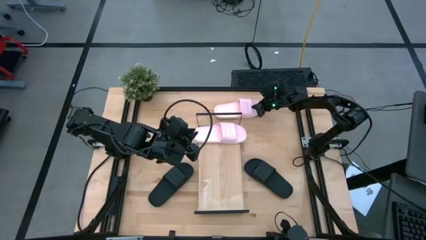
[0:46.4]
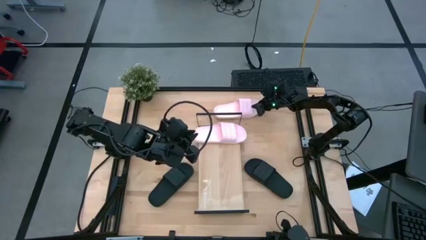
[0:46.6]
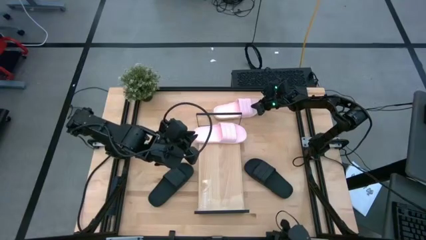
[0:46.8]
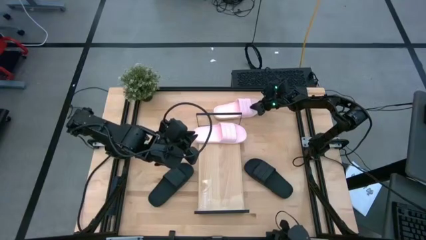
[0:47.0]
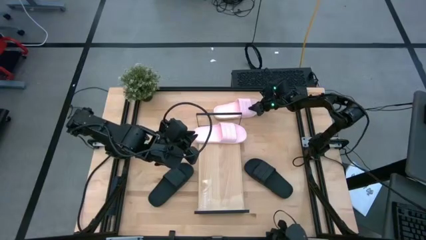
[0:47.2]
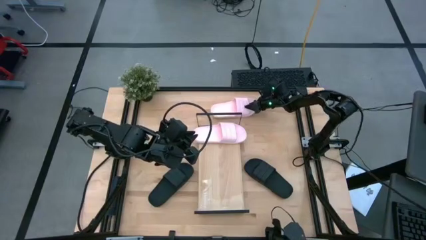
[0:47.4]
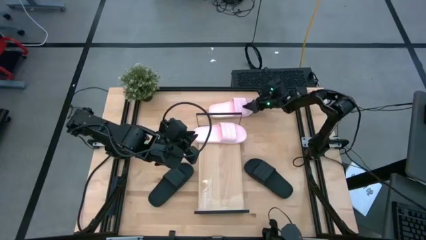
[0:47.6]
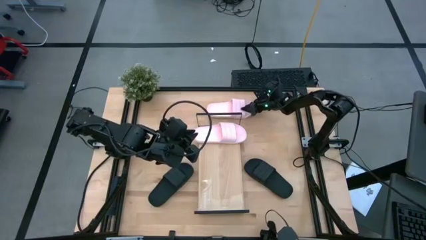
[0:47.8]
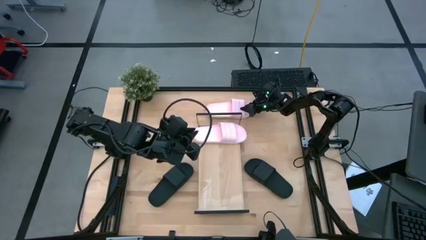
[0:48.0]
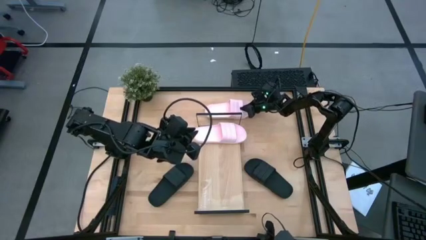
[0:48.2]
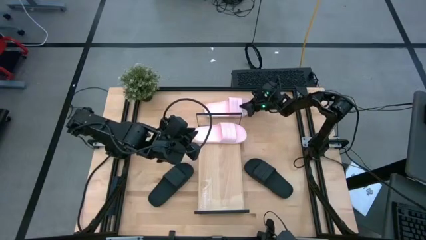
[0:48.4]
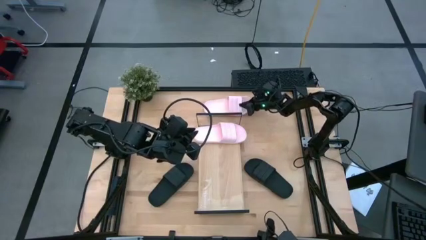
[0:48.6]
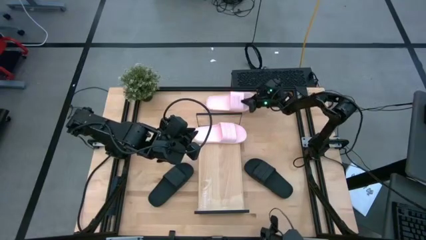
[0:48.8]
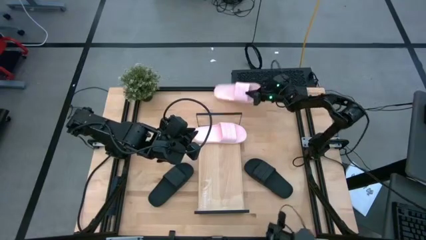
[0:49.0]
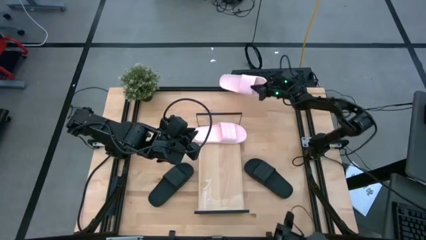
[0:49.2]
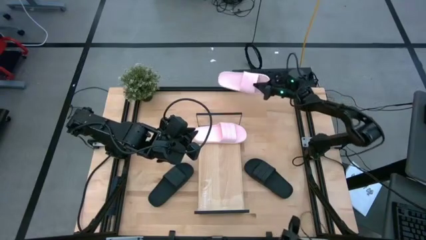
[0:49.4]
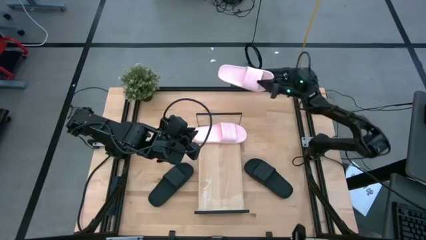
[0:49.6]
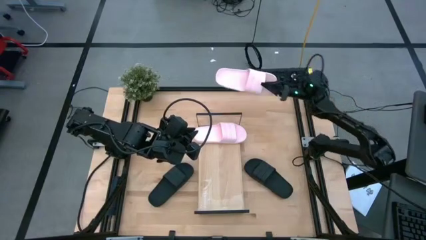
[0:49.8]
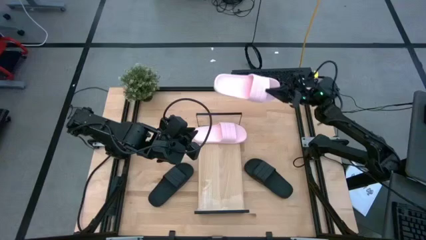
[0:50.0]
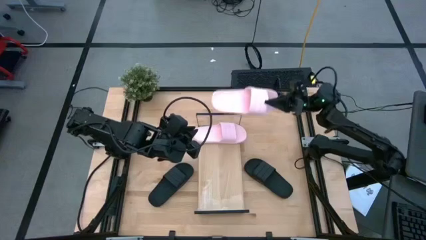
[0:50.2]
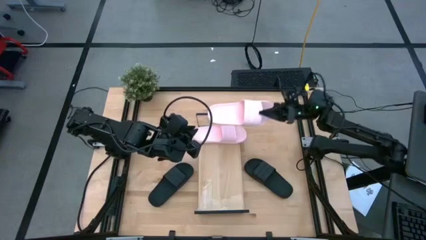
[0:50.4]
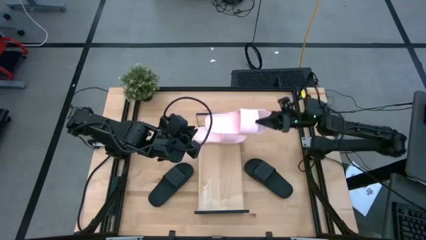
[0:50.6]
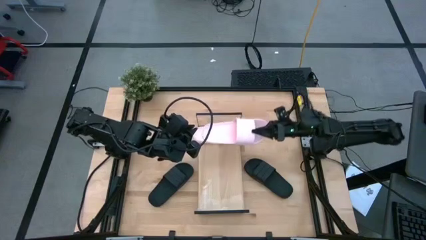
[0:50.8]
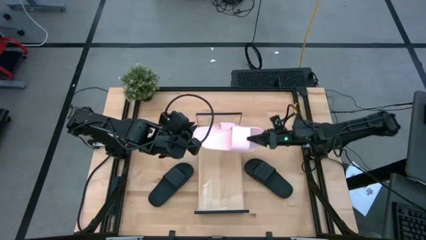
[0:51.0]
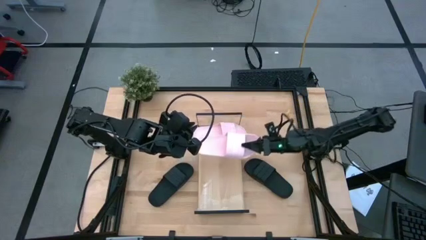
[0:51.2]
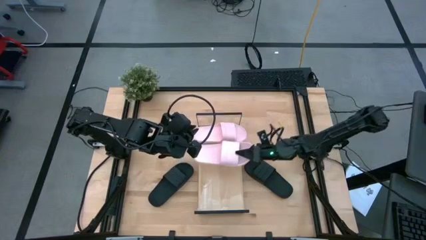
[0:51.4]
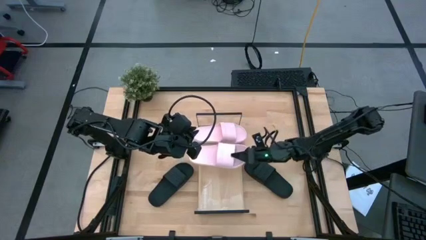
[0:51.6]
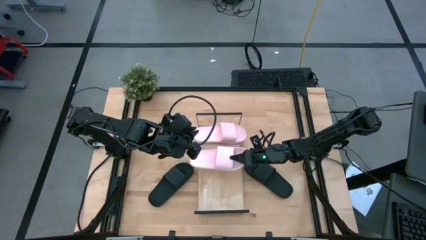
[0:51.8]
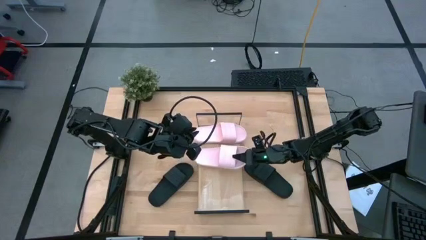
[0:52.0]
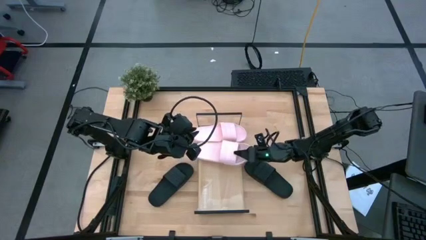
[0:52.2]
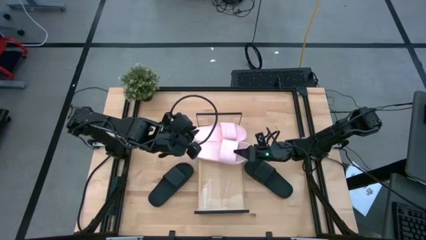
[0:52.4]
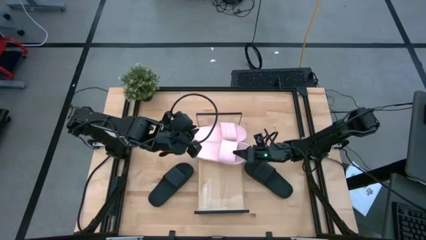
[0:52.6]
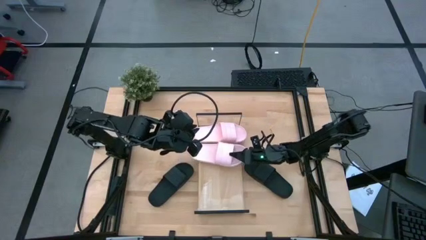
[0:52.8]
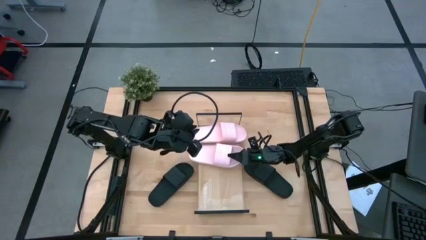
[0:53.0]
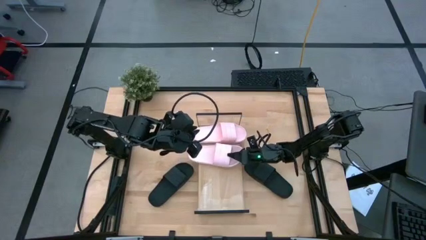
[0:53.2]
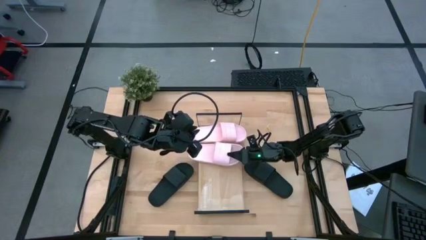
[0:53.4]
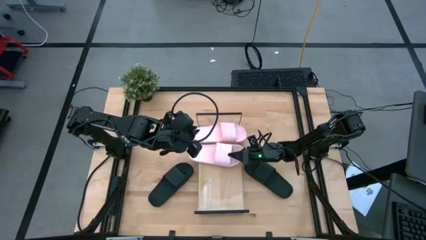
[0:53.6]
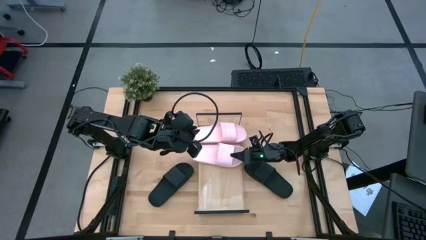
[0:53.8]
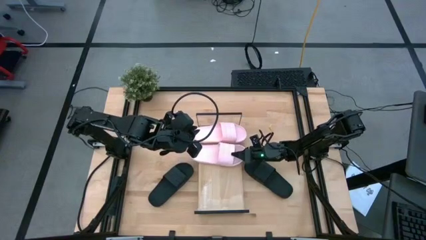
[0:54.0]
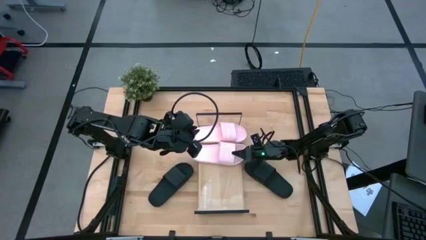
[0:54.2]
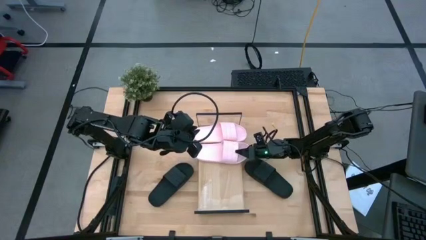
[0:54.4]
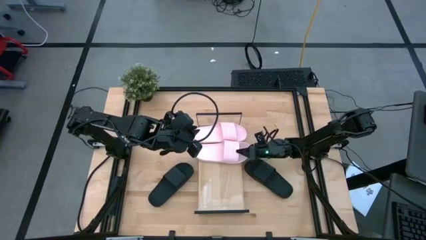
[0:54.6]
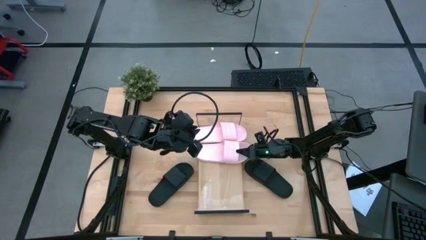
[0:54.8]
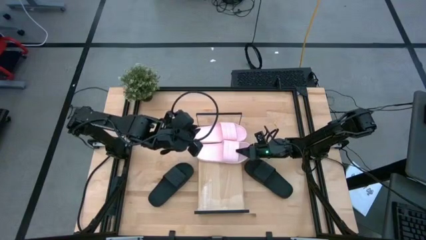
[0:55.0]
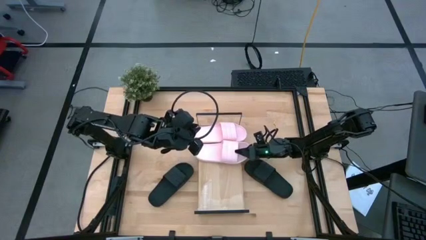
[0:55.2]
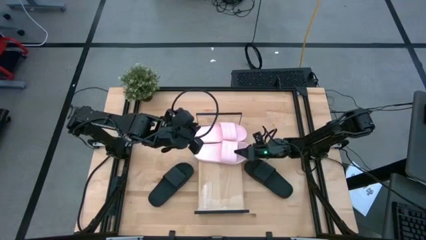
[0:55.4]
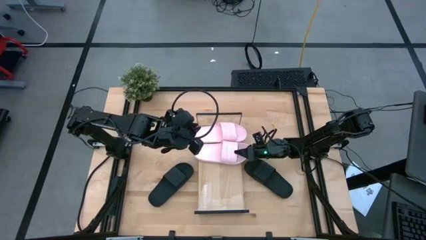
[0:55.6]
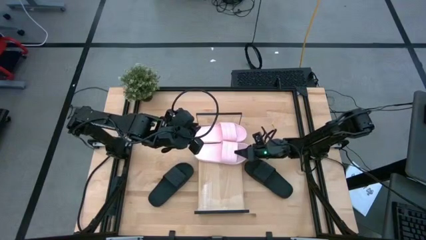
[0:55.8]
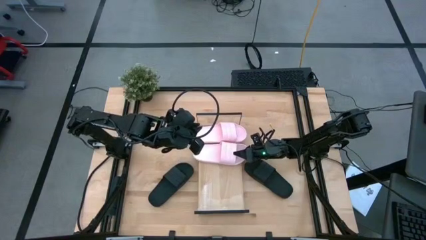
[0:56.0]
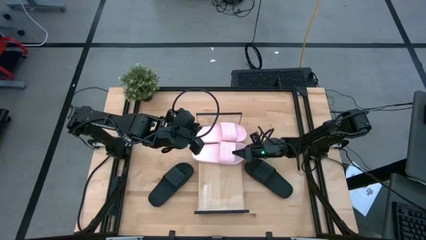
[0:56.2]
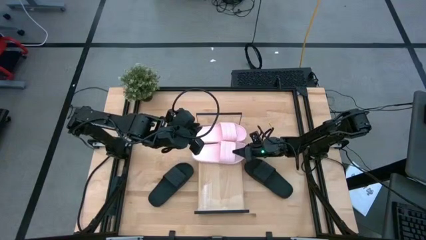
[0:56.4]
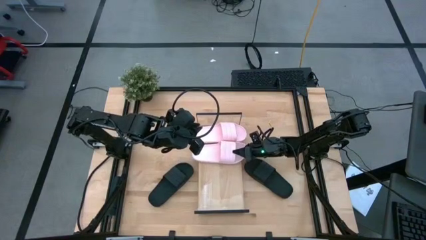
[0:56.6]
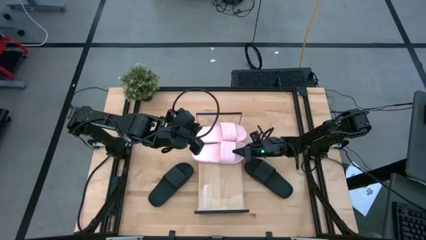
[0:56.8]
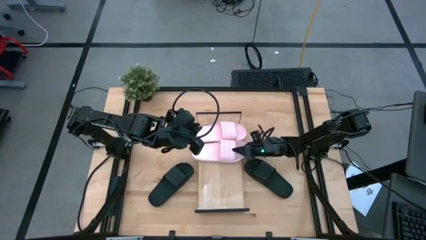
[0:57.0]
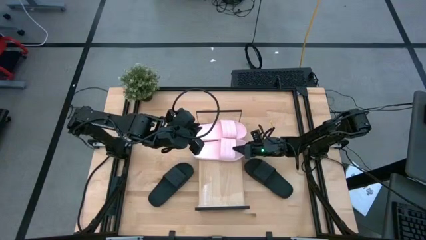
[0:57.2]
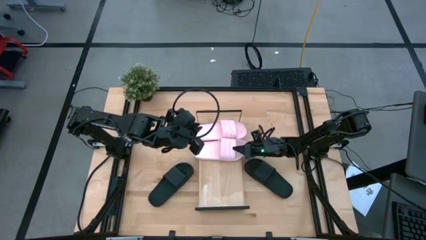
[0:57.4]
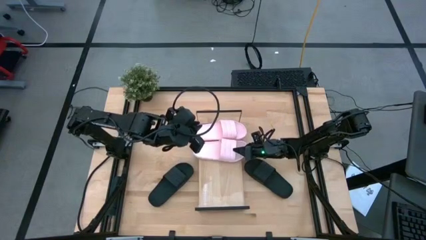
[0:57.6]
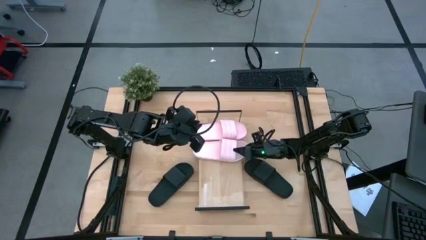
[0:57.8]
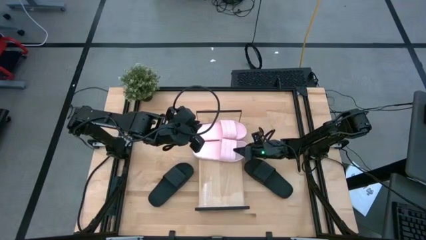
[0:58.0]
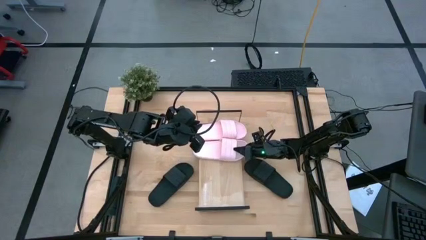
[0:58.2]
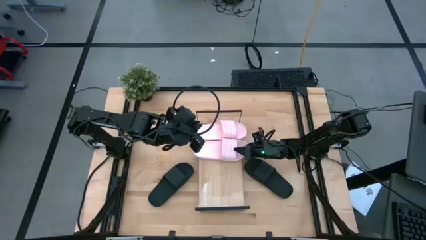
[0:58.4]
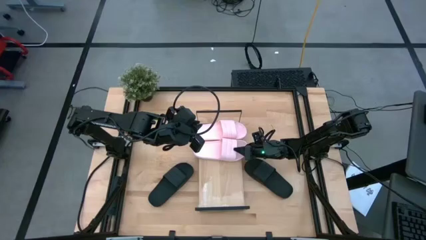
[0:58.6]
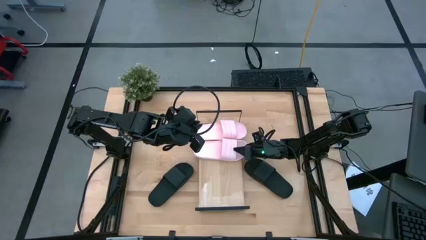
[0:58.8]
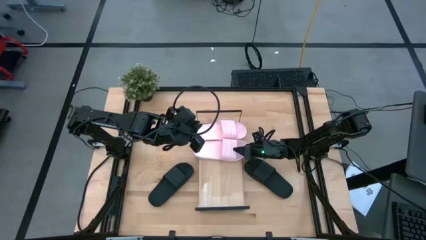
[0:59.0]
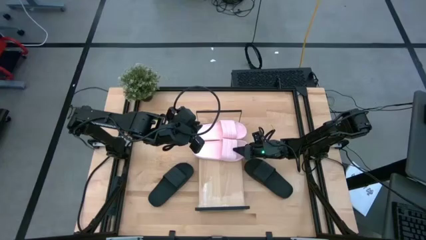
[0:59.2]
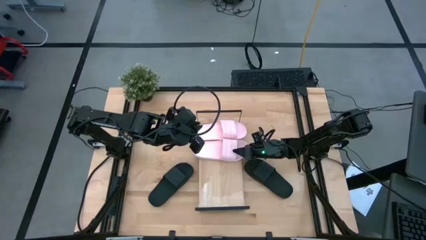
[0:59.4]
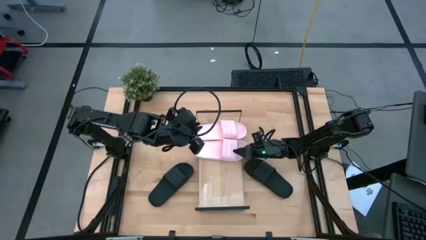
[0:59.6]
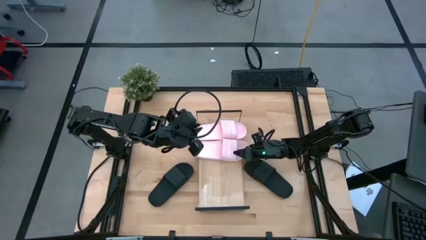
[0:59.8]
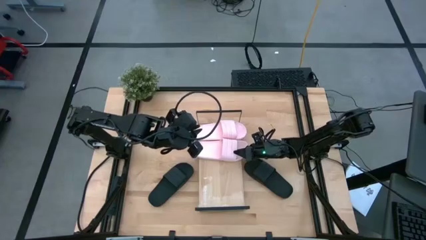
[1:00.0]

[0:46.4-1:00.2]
Task: Pick and place slides into the shelf
Put the pink slide on the shelf

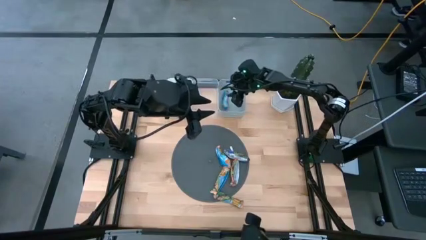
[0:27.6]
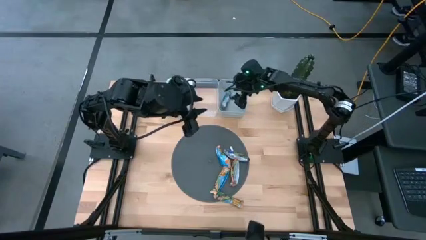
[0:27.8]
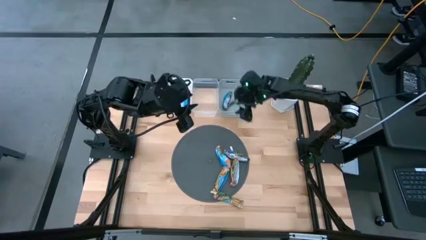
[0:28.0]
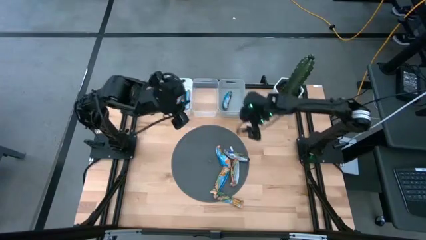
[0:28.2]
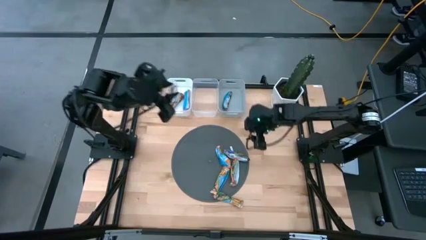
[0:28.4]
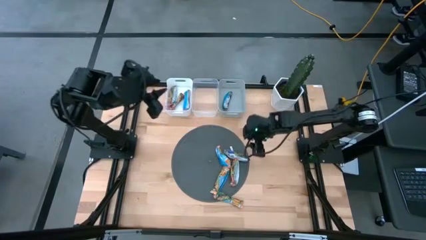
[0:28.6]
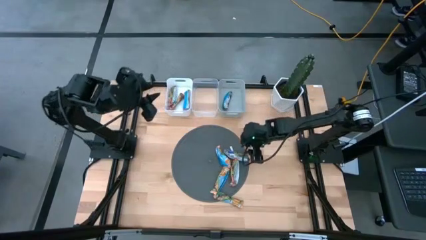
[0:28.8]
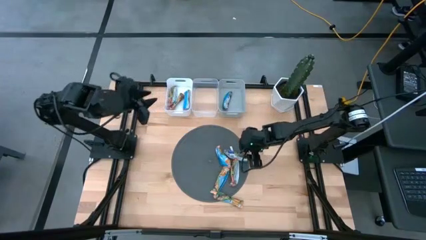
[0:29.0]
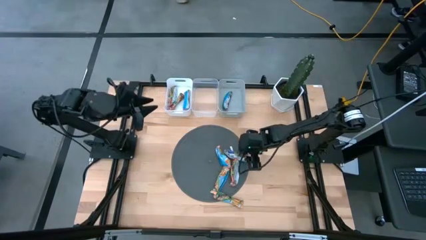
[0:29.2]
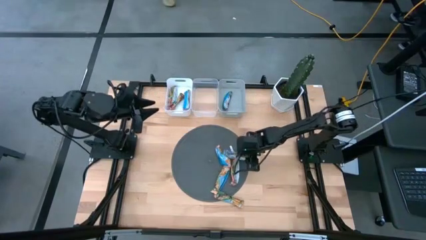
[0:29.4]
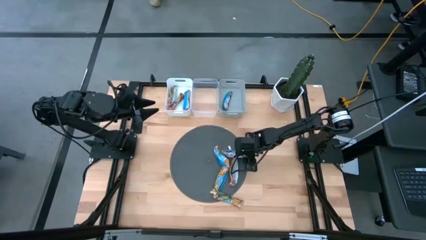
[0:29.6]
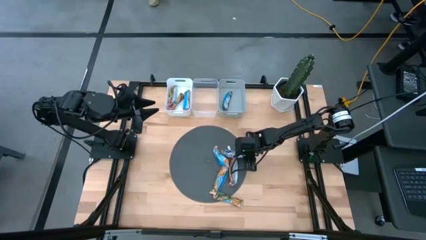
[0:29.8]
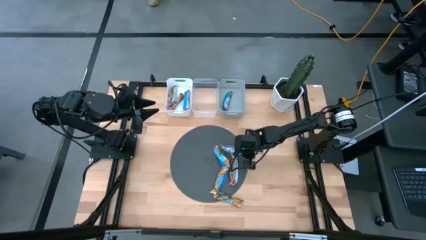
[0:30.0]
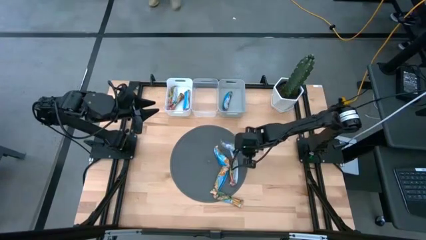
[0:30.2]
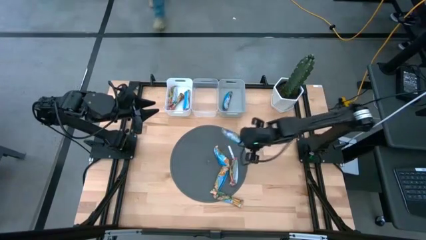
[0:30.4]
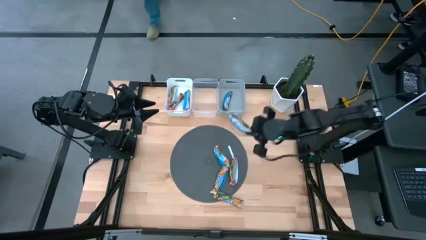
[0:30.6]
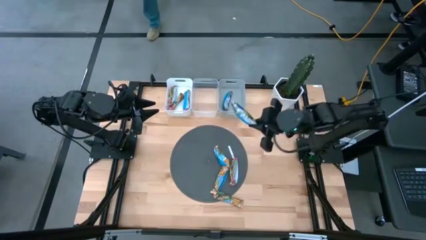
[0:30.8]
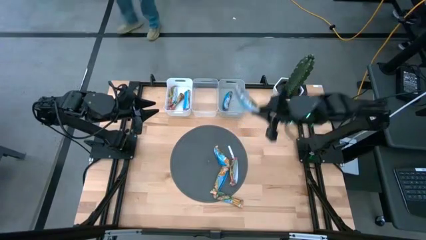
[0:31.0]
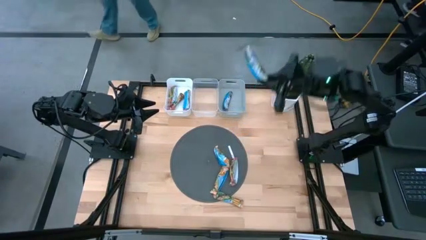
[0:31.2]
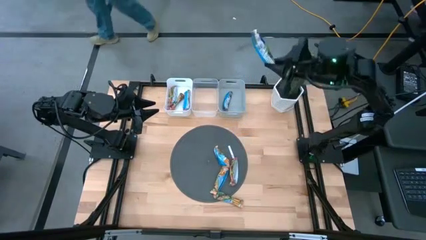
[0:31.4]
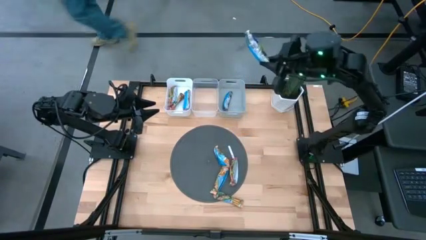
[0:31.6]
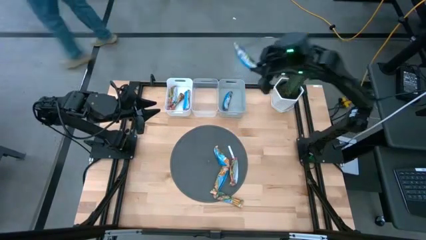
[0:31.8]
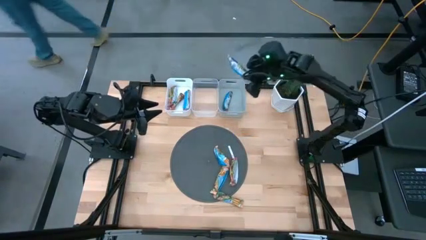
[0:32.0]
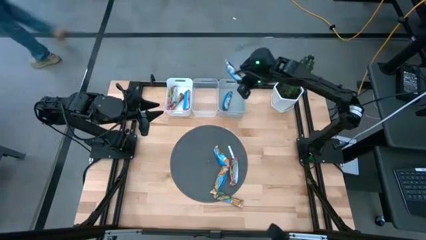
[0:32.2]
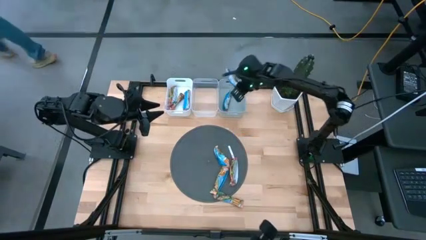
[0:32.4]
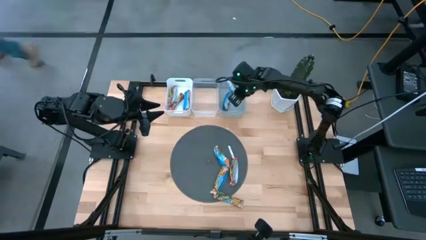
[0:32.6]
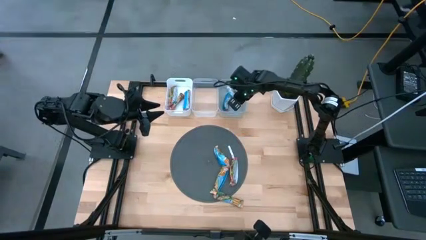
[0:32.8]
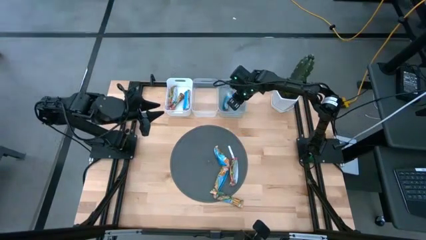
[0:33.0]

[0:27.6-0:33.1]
Task: Pick and place Granola Bars by type
Put the blue granola bar into the gray bin
